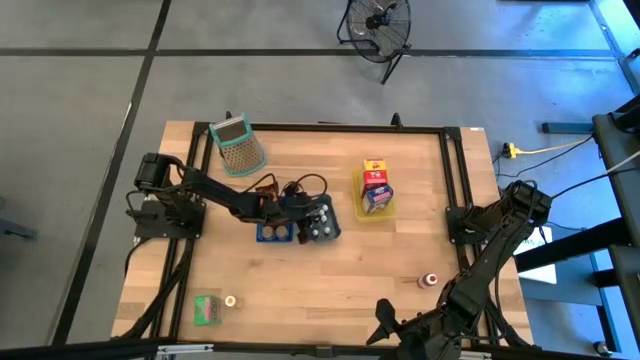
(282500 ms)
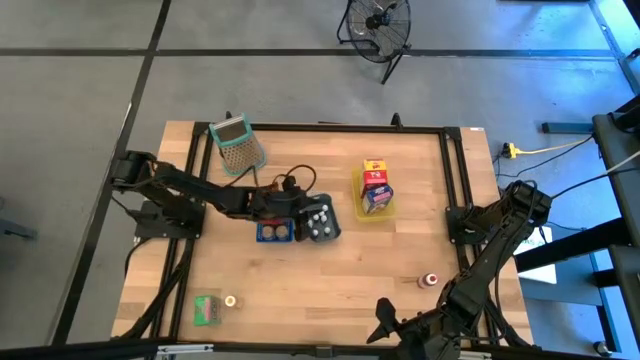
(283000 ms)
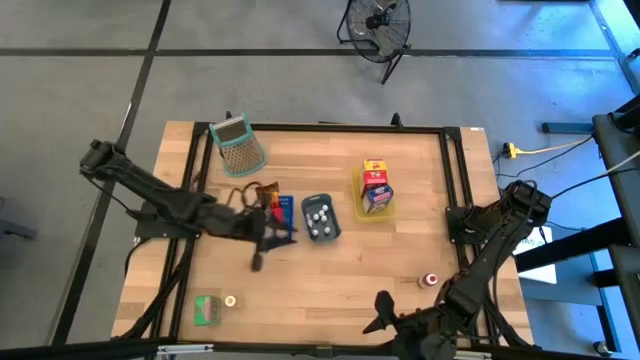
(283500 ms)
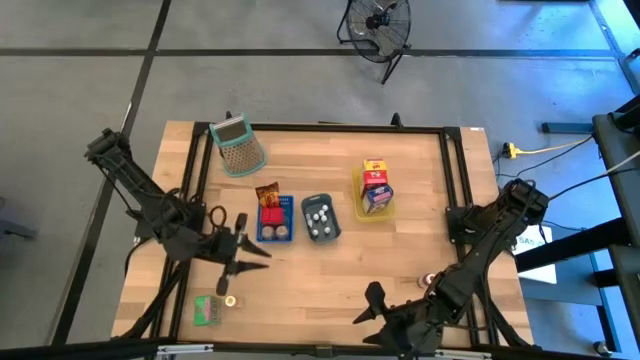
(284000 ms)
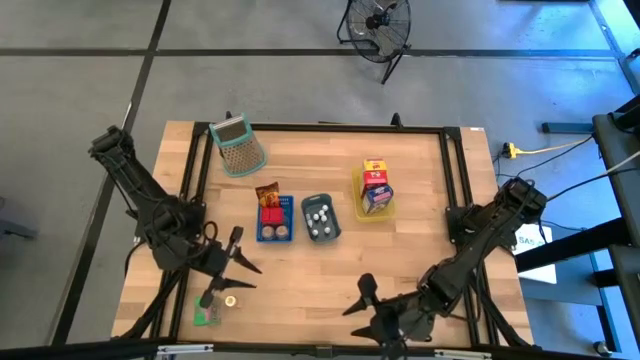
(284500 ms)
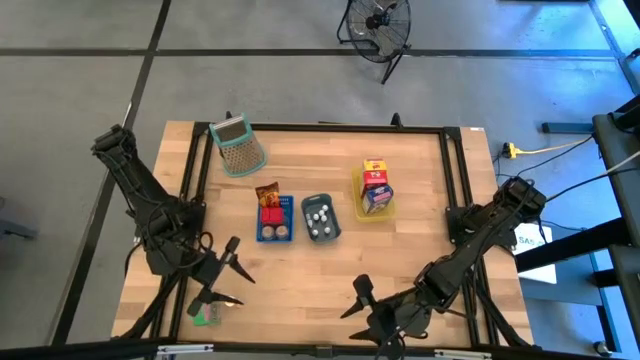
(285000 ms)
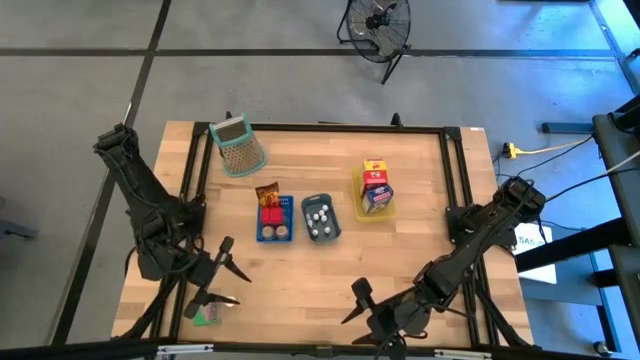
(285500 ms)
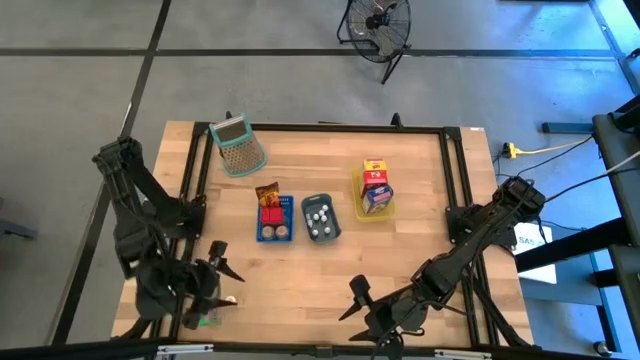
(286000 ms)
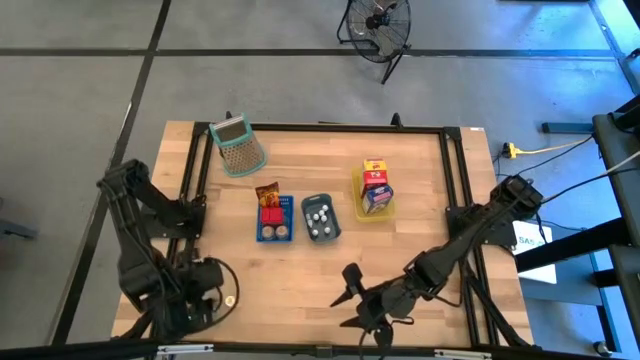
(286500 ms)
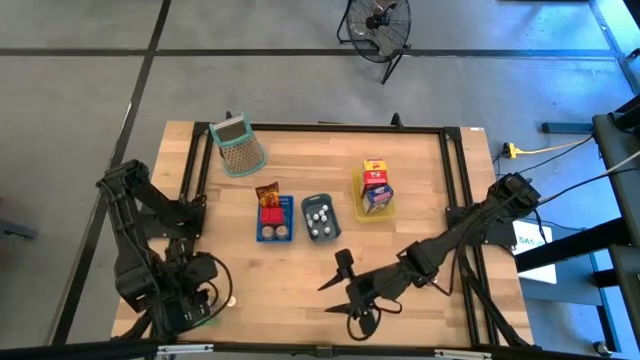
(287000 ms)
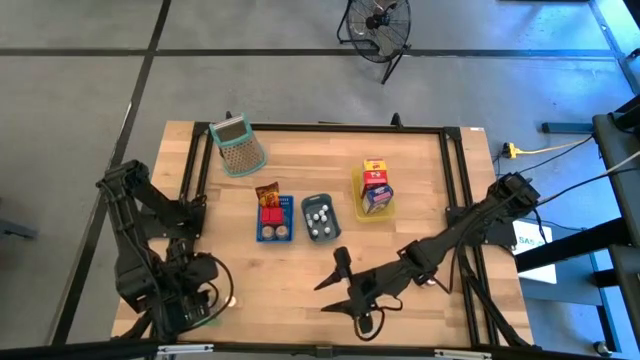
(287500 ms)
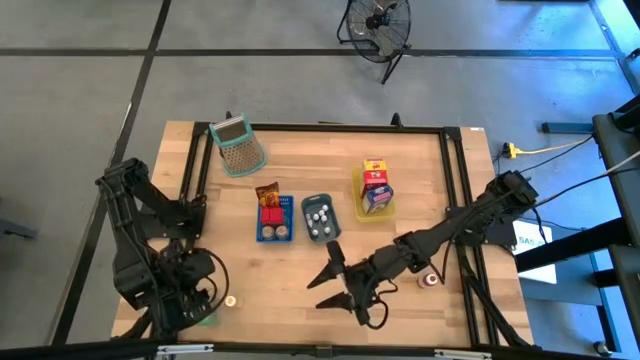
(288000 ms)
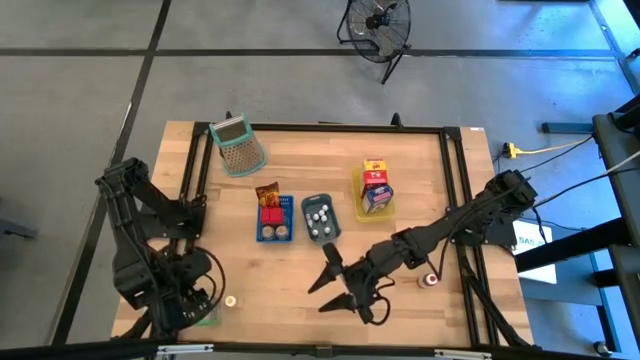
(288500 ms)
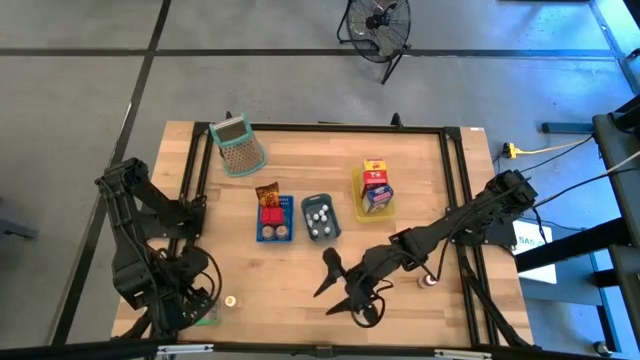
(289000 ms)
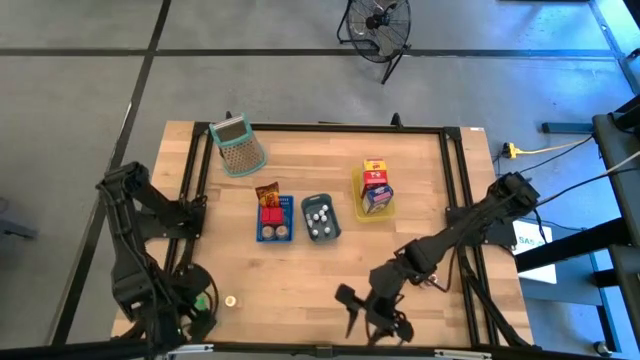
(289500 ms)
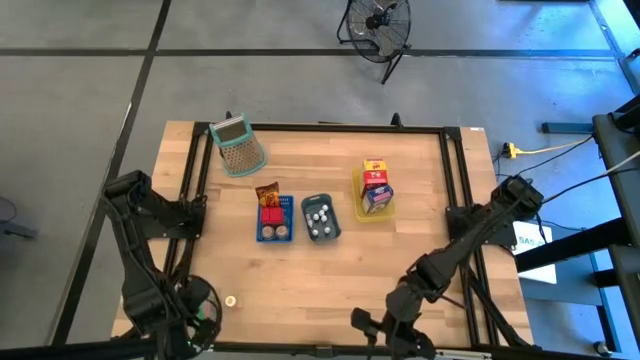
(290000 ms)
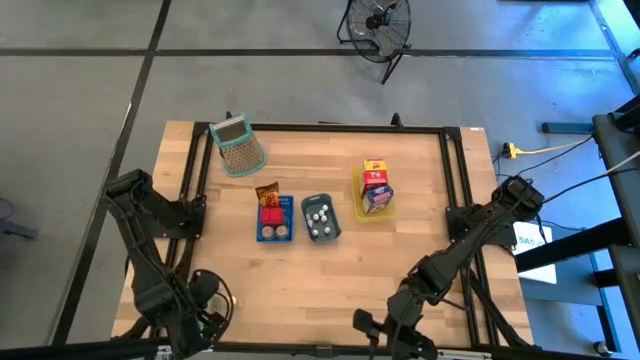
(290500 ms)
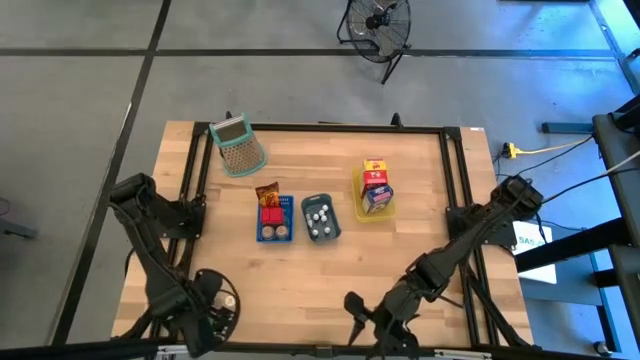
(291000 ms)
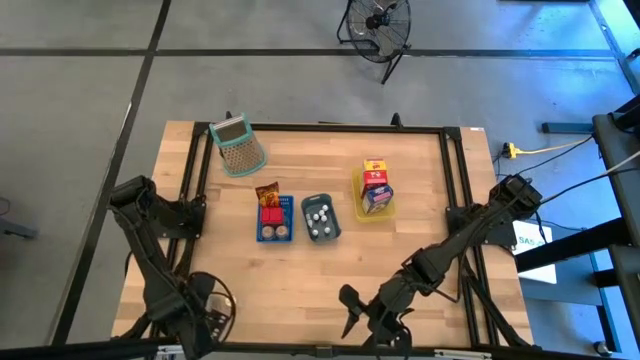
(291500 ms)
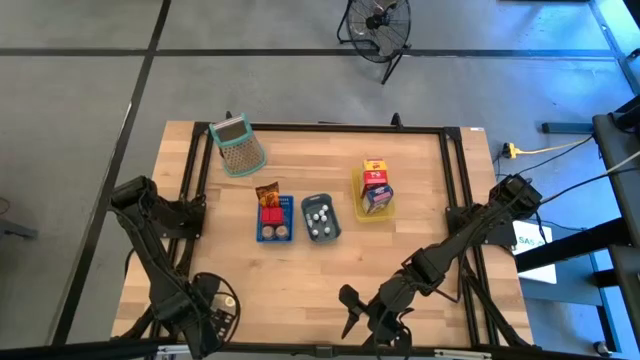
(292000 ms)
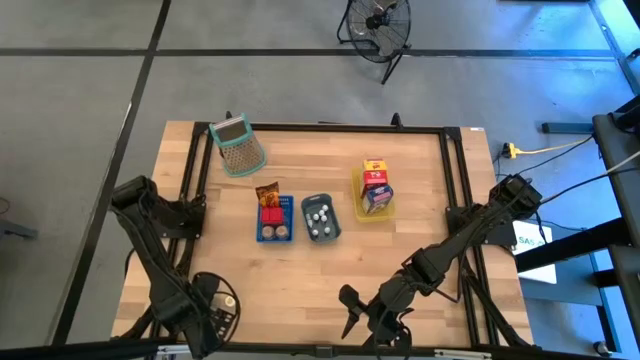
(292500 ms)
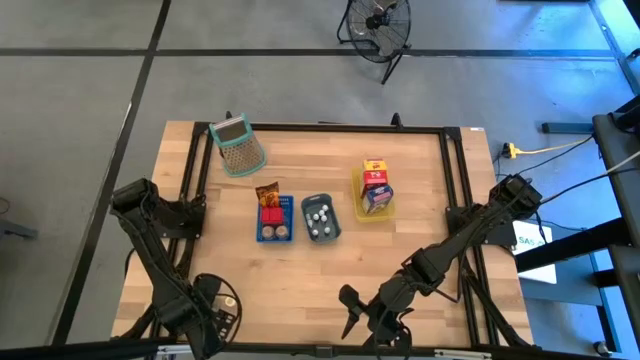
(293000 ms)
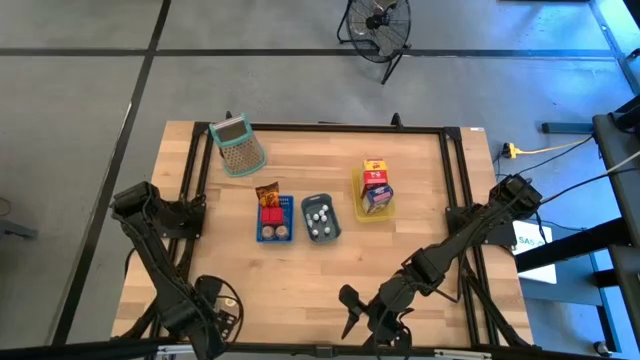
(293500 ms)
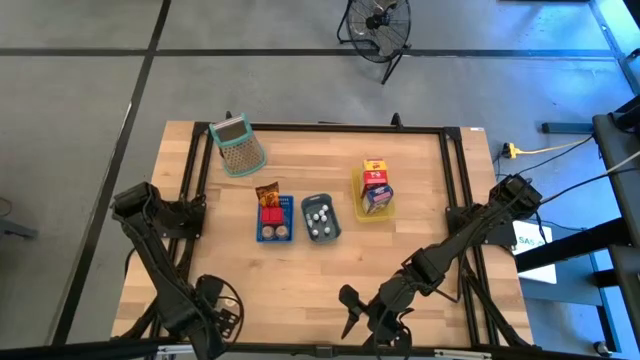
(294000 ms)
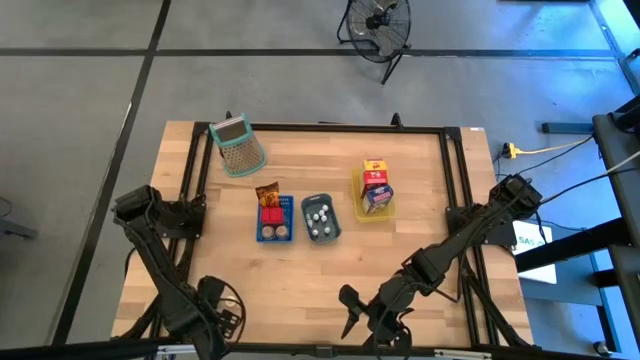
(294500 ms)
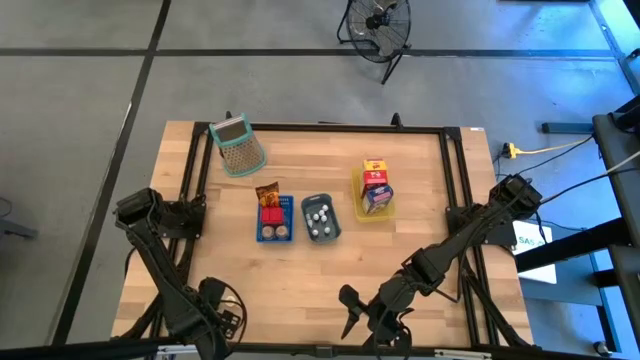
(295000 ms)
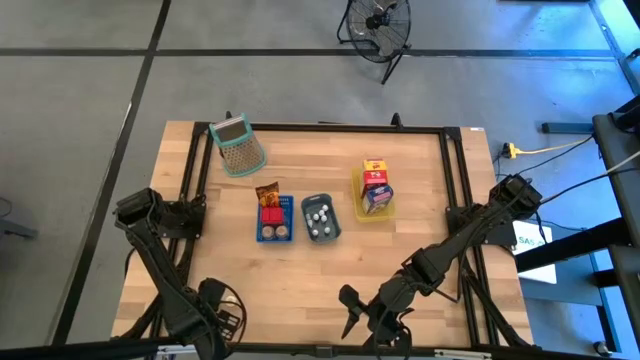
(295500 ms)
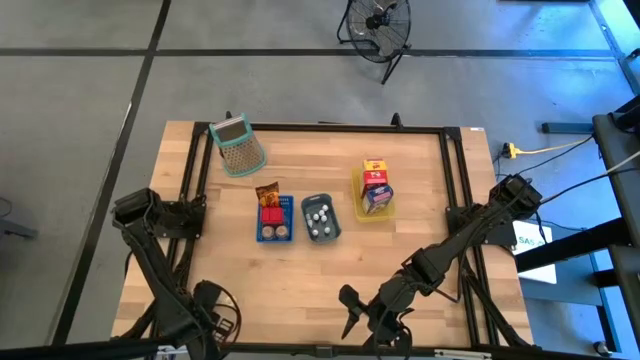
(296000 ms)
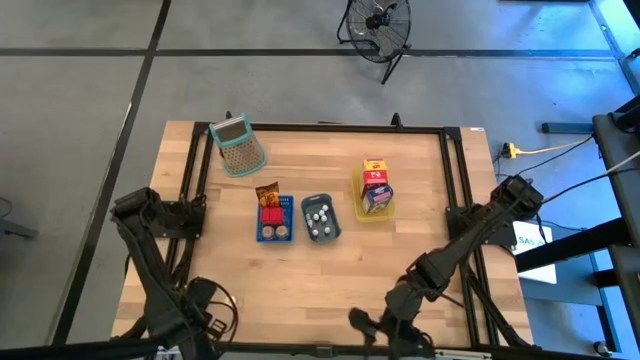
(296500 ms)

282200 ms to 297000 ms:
Task: Pick & Place Kitchen Items
Put the green cereal box into the yellow bin

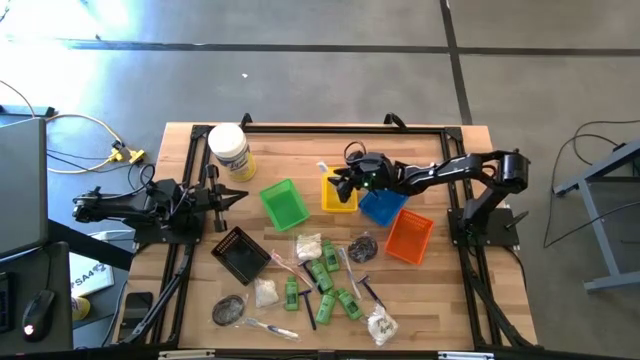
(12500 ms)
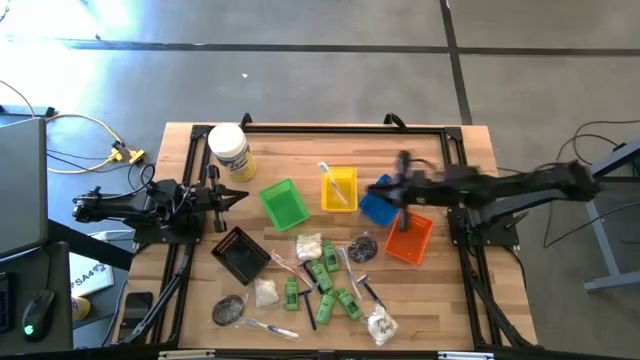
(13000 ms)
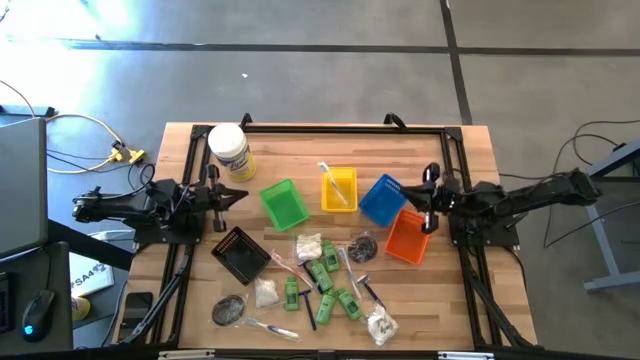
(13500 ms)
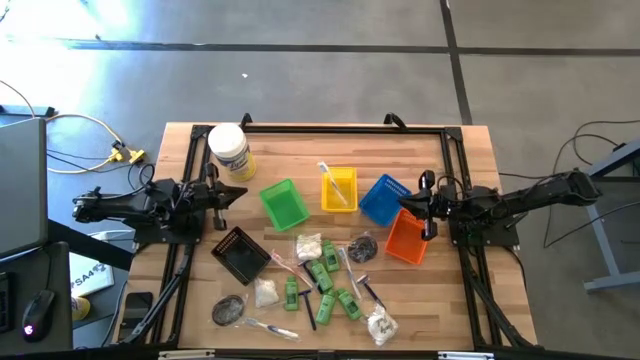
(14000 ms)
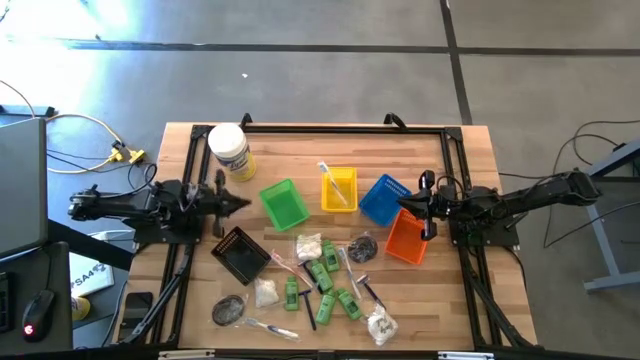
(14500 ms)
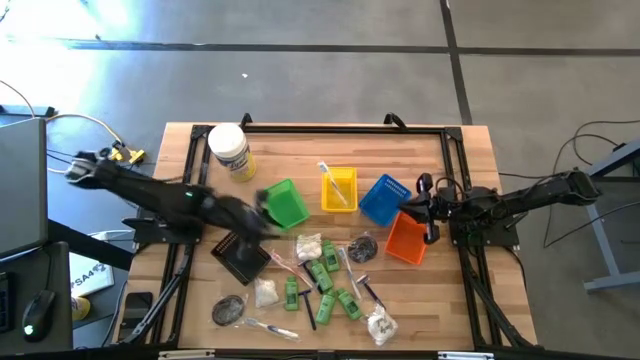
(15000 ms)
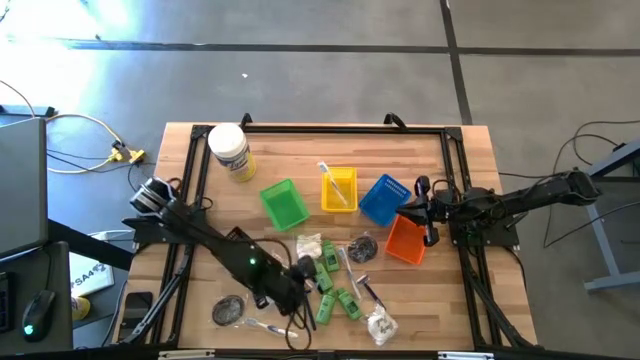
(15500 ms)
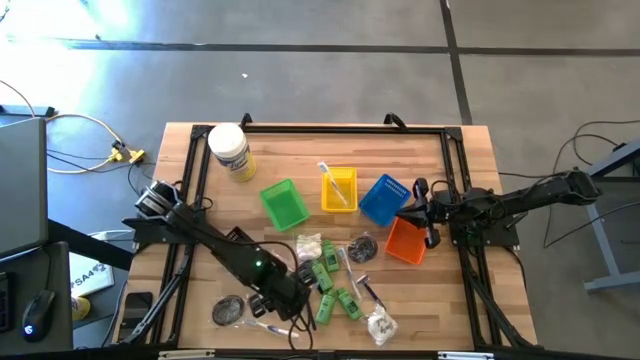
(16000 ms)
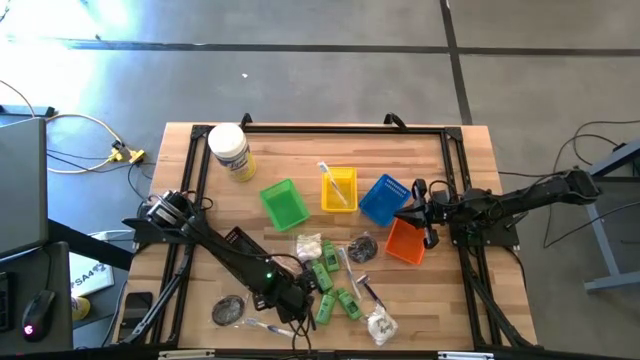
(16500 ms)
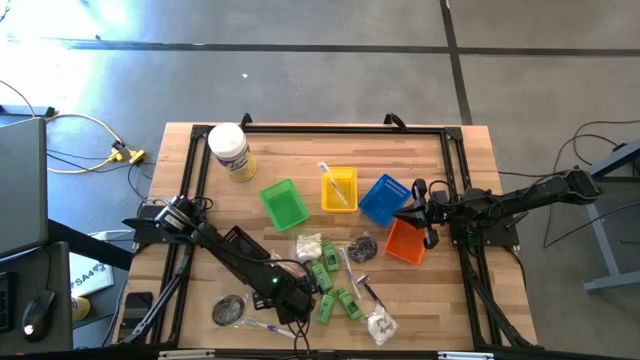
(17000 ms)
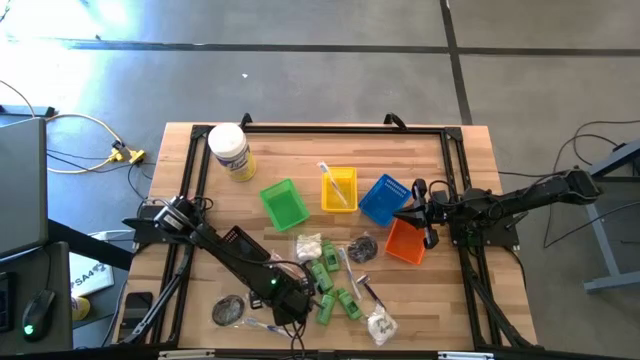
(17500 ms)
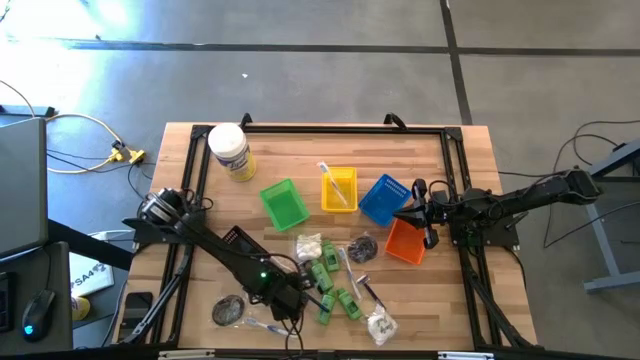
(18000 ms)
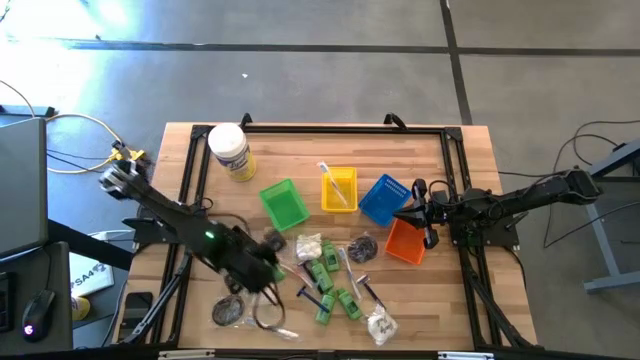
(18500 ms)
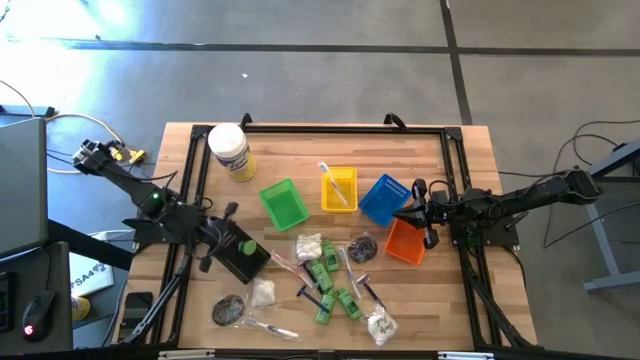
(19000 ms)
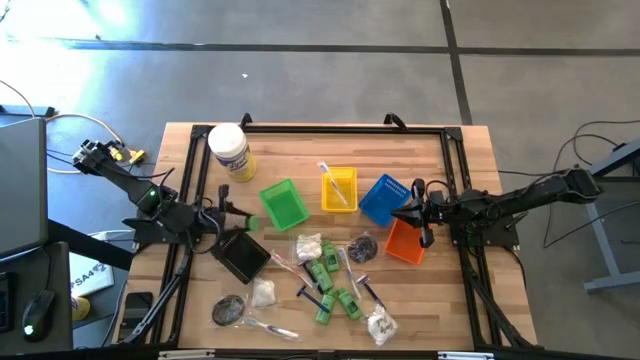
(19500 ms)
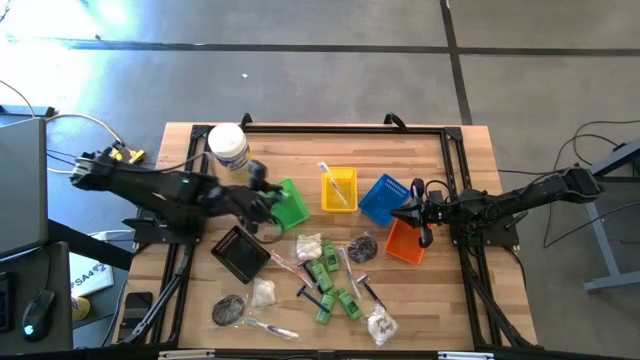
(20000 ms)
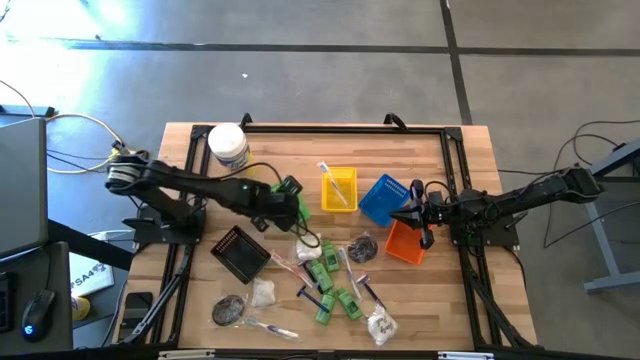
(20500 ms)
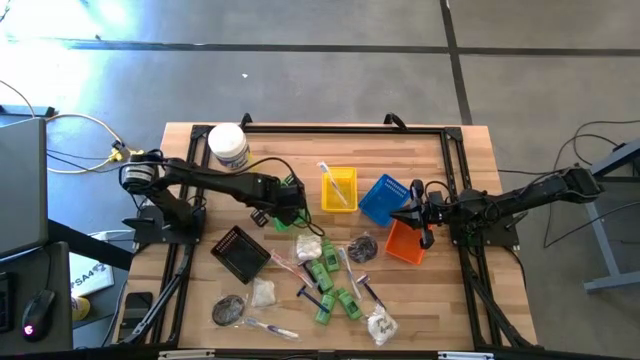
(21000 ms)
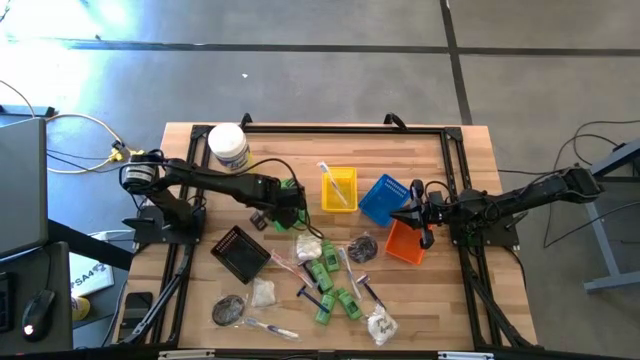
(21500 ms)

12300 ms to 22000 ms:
Task: Pick & Place Travel size toiletries
Put the shampoo into the green bin
